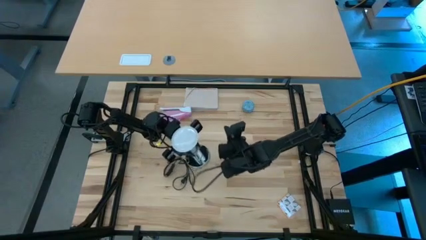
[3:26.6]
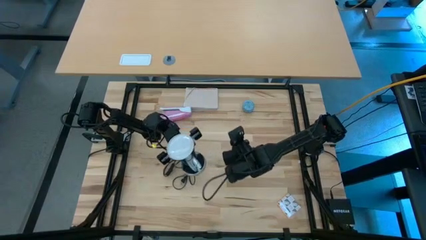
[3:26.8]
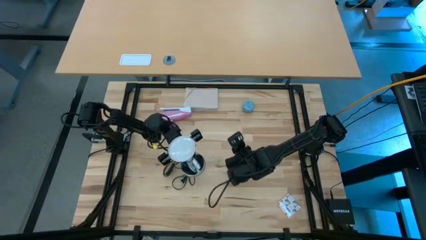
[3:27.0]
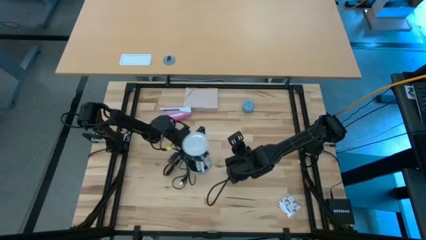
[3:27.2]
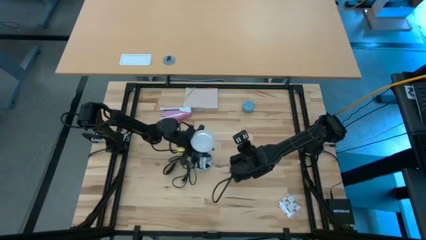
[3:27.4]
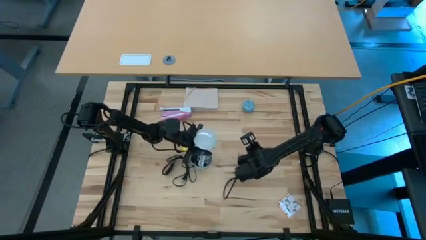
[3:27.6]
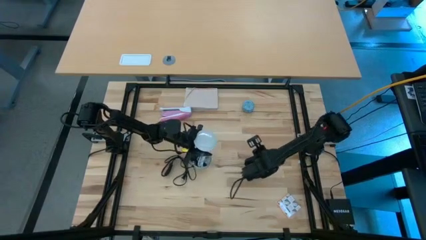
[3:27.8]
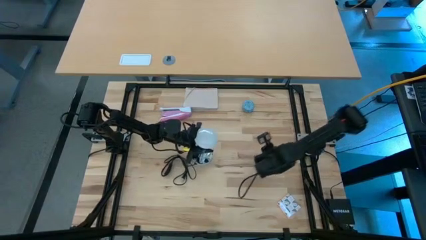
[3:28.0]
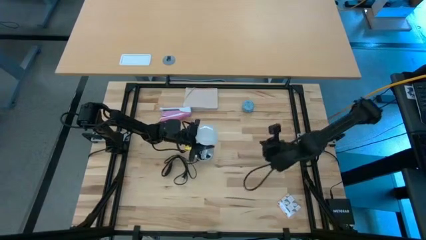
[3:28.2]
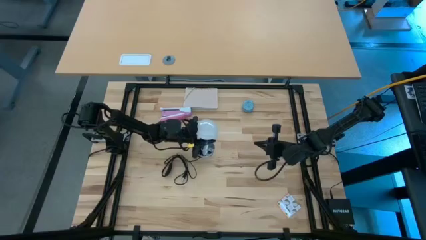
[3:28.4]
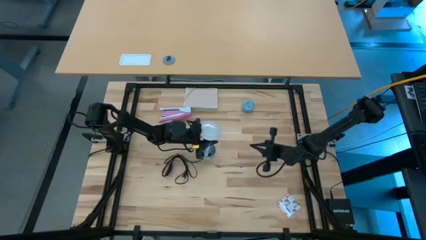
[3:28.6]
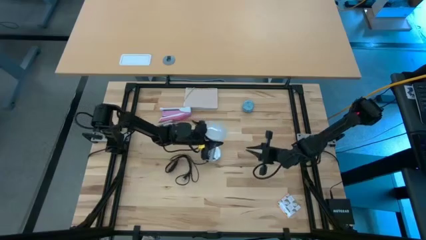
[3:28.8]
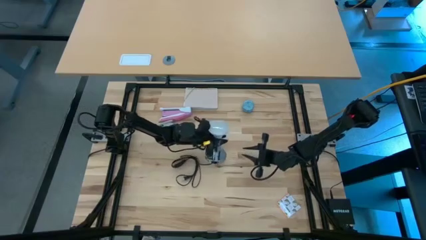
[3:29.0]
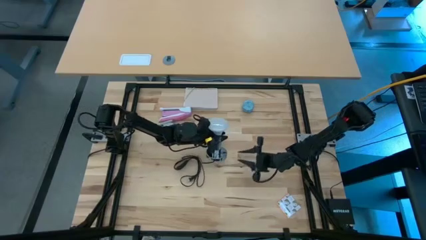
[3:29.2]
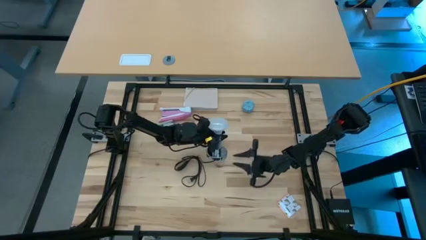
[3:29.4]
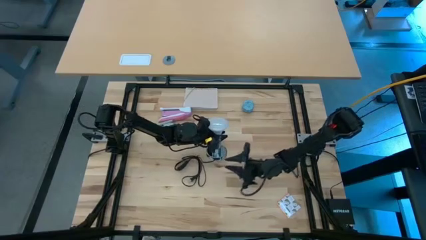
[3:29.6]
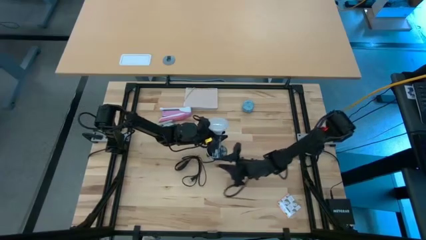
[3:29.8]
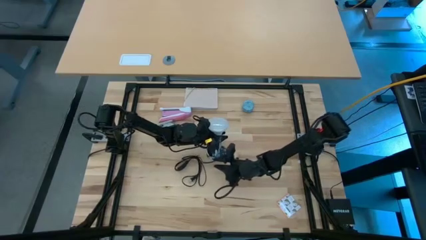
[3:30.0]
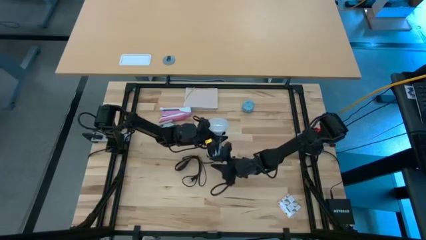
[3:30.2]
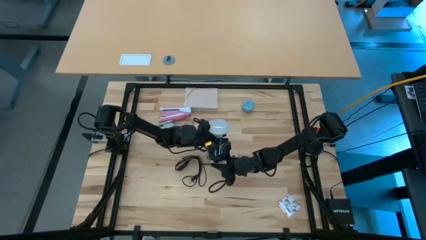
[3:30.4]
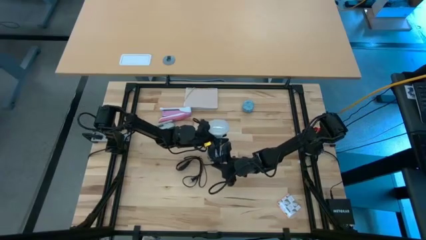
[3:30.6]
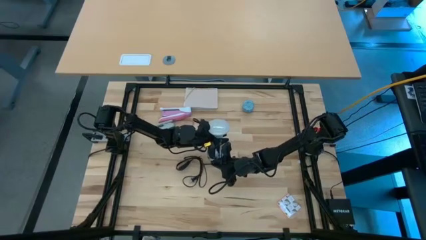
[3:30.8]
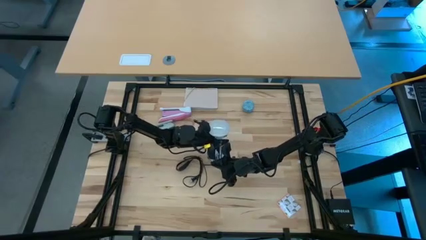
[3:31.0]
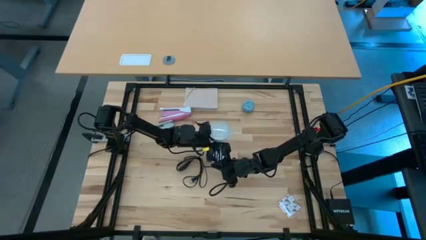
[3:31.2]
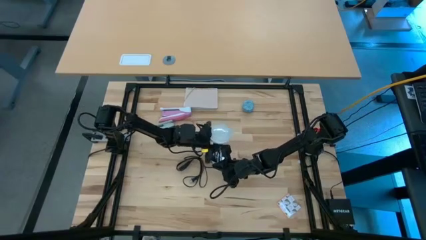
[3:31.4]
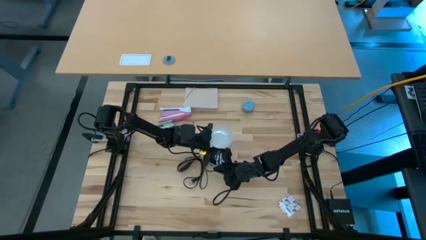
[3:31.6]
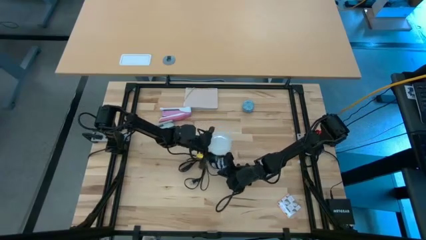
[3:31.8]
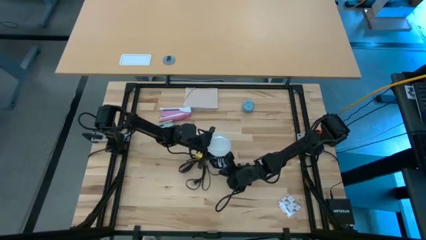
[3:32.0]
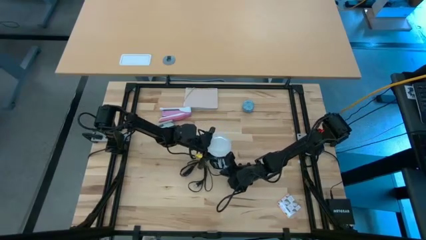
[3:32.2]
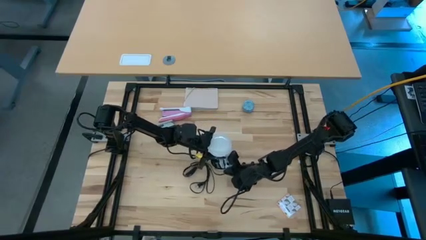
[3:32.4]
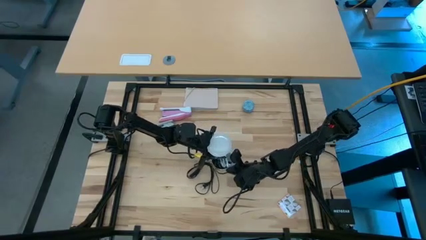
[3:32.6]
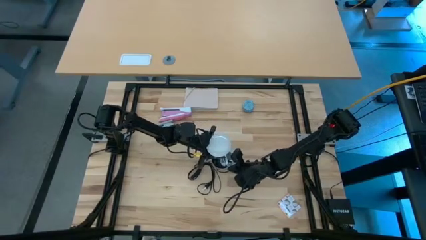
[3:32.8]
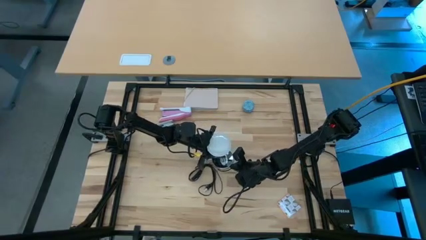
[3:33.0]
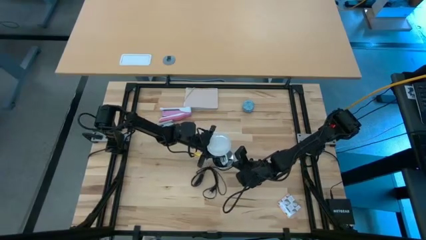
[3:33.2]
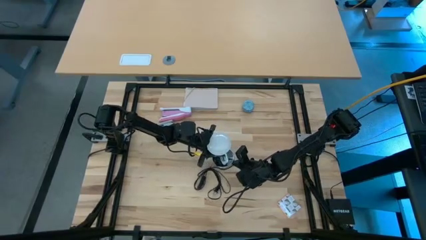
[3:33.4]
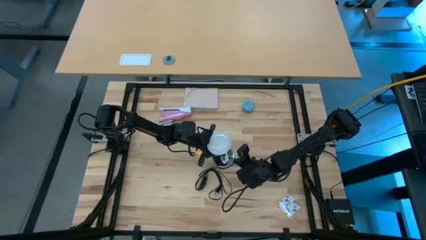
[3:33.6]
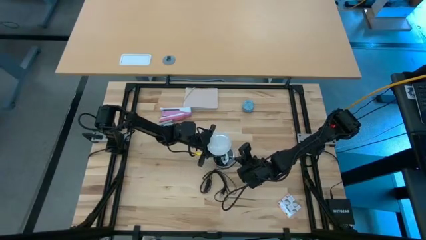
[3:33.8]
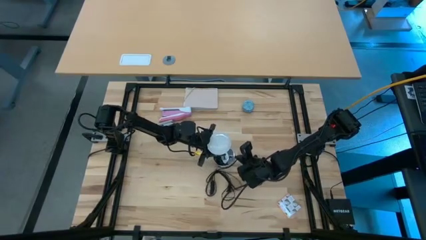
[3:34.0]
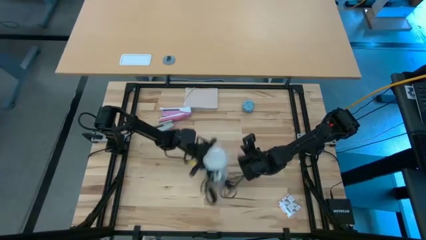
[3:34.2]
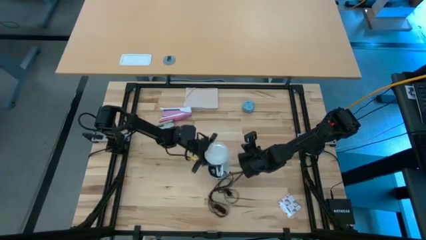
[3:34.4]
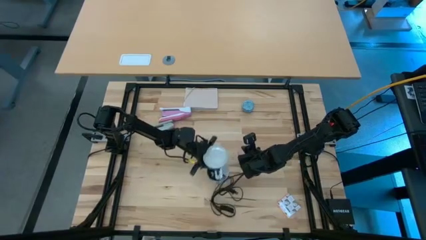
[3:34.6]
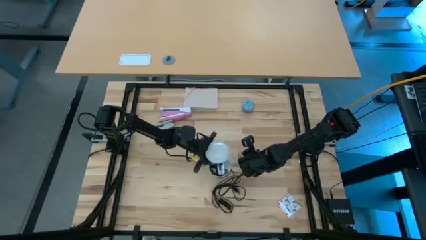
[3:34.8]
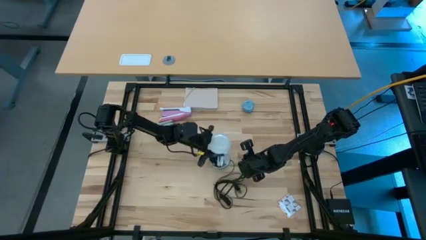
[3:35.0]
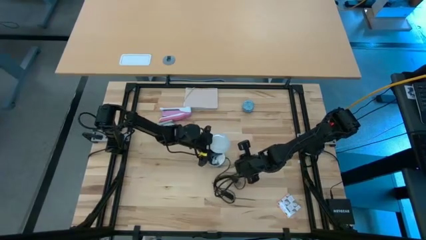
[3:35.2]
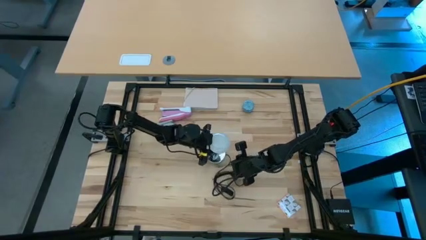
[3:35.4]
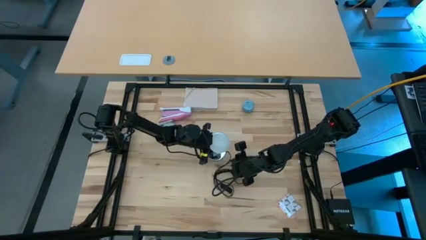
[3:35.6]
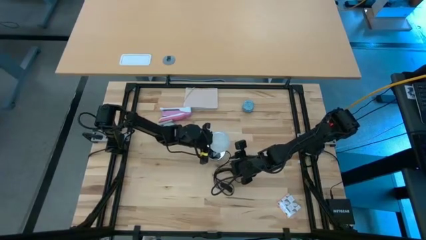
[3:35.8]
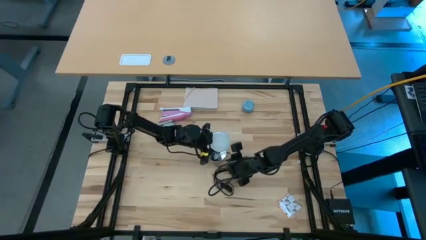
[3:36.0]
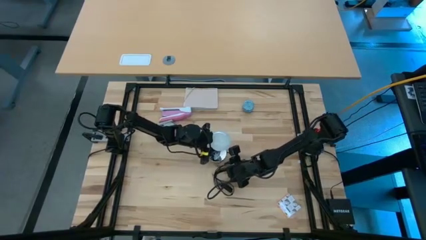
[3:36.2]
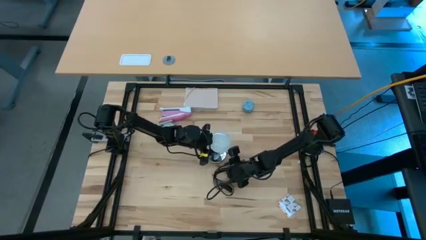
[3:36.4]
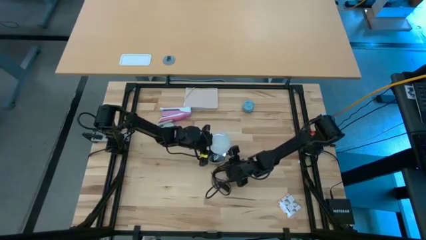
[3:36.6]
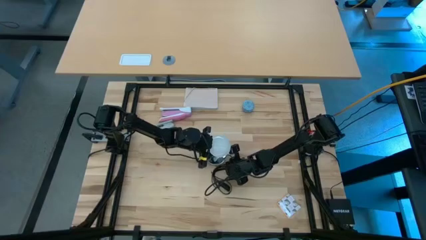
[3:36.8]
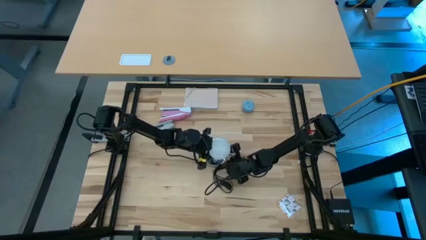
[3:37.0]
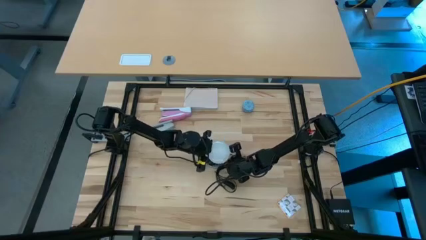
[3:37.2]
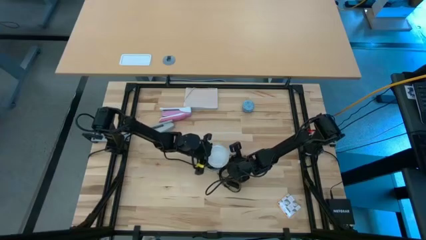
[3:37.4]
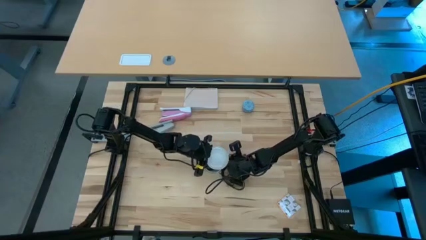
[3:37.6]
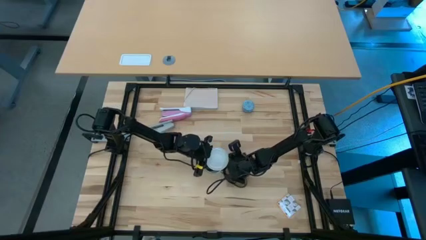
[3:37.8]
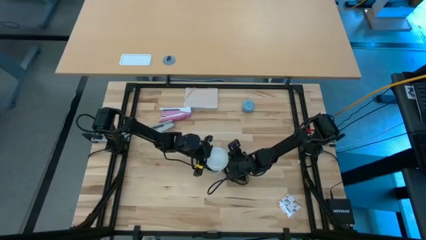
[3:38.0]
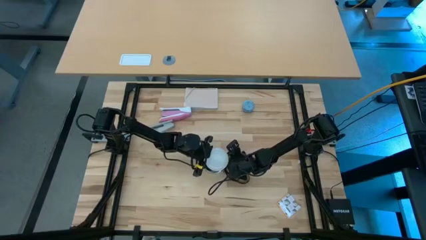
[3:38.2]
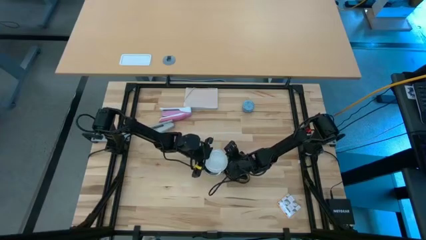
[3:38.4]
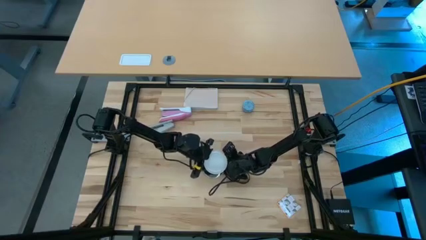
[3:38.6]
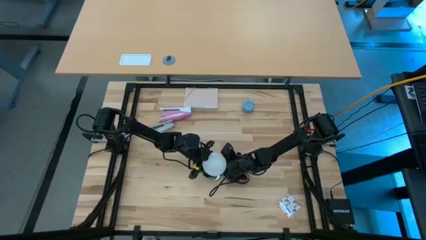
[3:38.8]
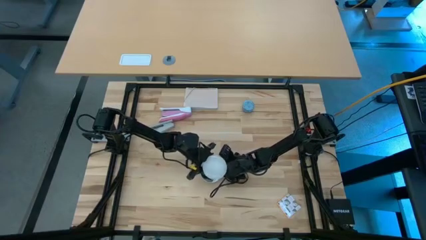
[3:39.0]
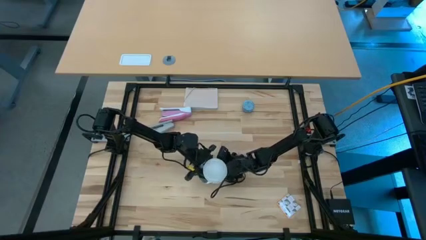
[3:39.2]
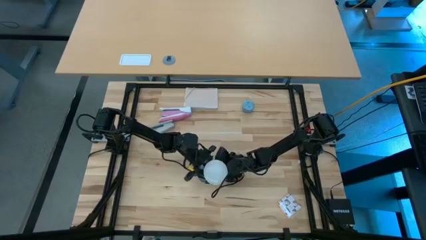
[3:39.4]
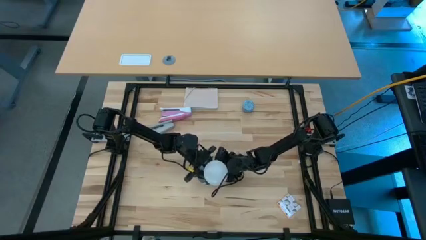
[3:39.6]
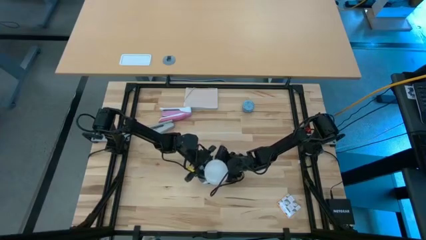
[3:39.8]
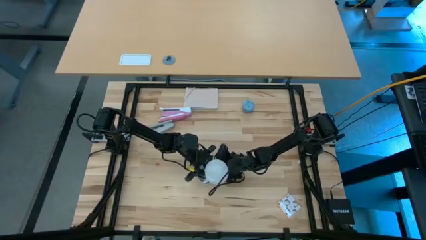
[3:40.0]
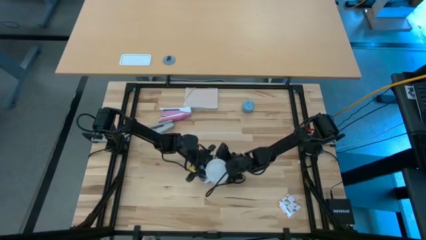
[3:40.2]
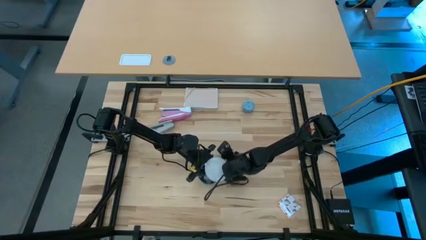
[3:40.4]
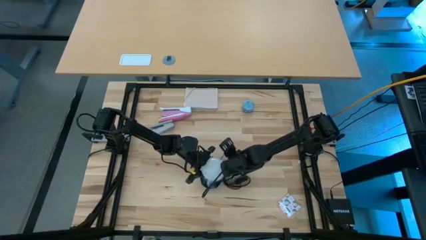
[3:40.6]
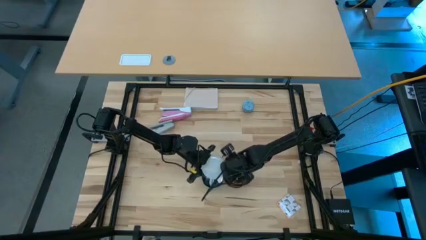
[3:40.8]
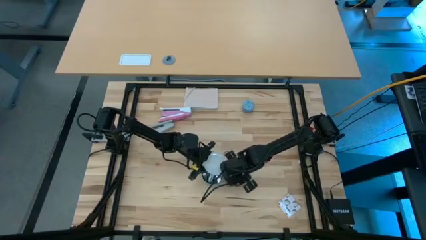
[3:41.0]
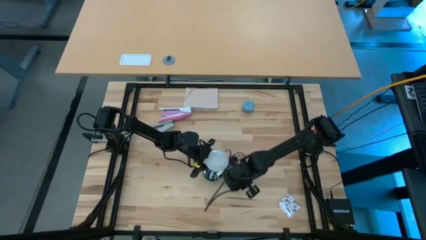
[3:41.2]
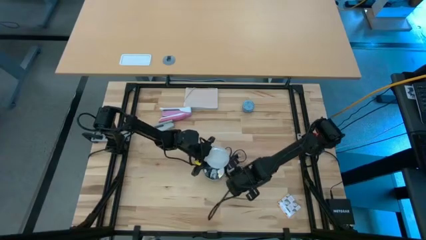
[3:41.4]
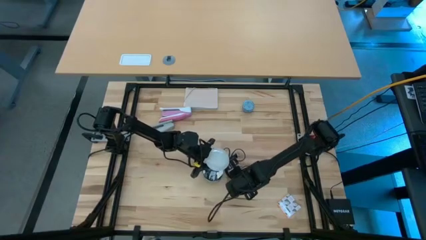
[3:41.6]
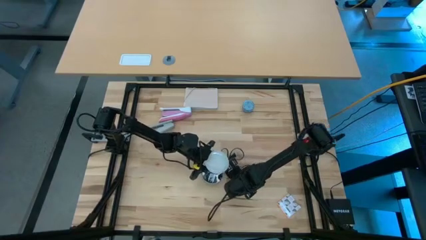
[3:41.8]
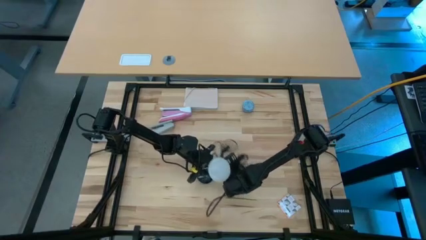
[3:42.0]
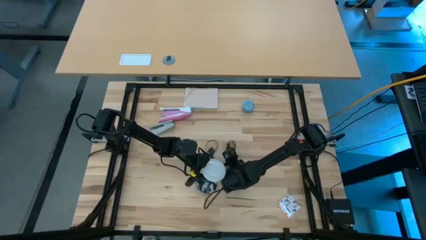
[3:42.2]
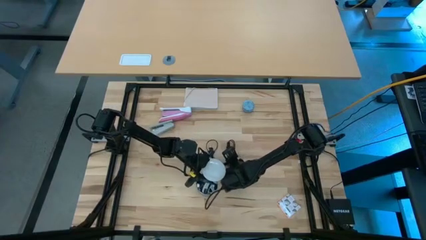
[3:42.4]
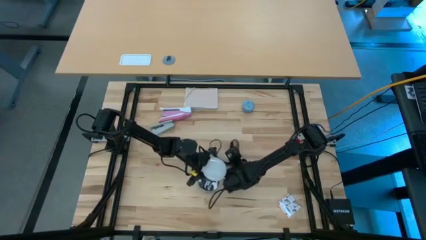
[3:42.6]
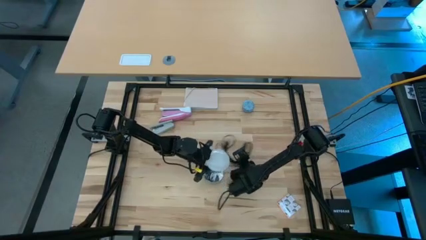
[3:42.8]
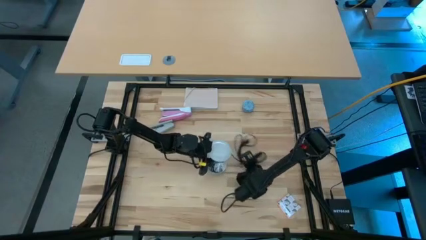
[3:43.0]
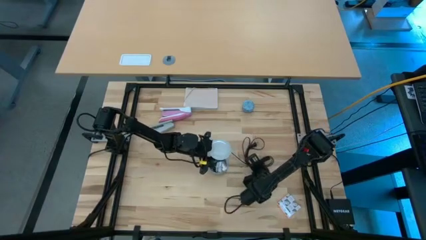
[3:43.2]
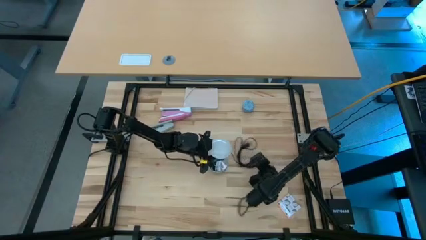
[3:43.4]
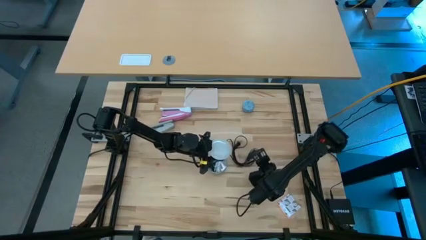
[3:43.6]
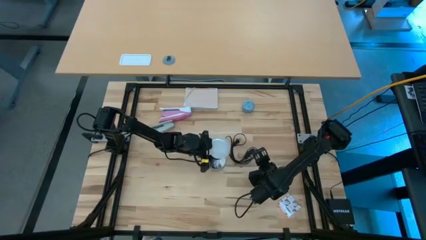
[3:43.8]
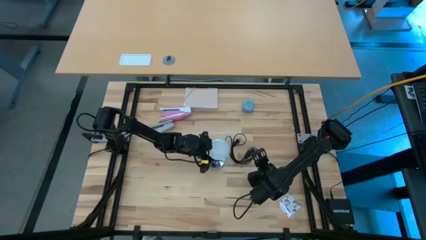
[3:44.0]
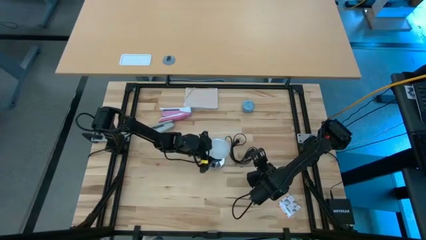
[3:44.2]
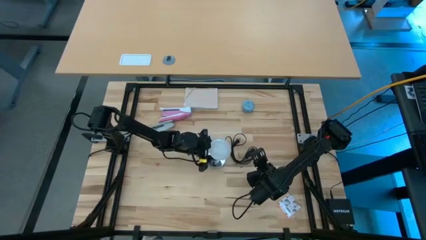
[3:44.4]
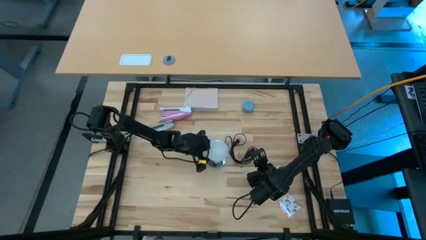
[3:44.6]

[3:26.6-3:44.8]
Task: Screw lightbulb
Insert the white lightbulb into the desk lamp
